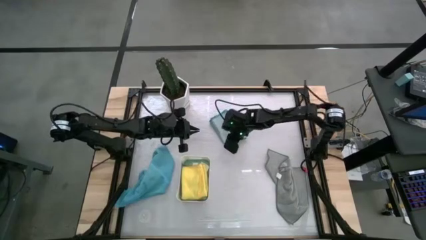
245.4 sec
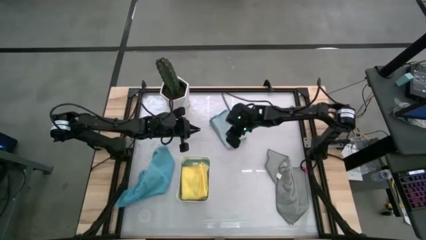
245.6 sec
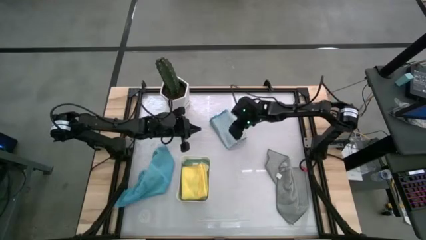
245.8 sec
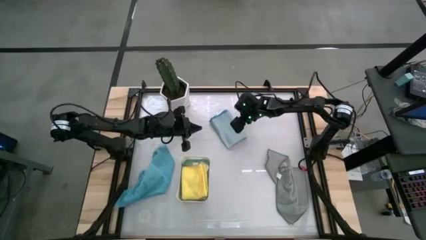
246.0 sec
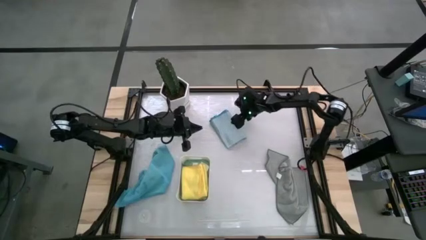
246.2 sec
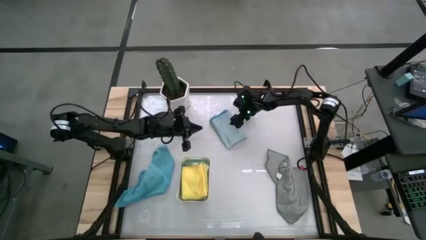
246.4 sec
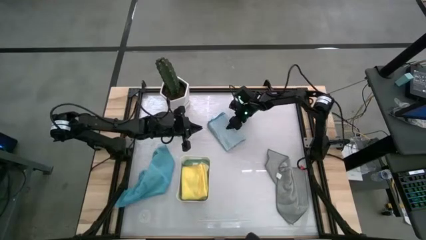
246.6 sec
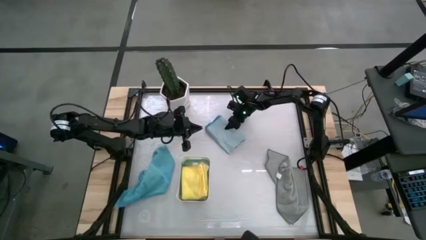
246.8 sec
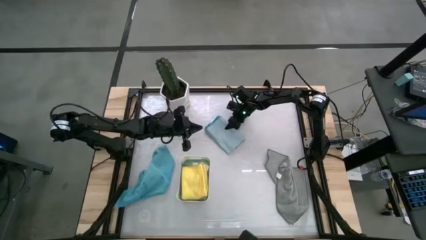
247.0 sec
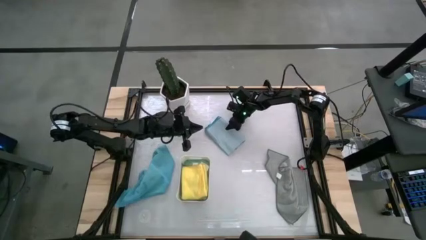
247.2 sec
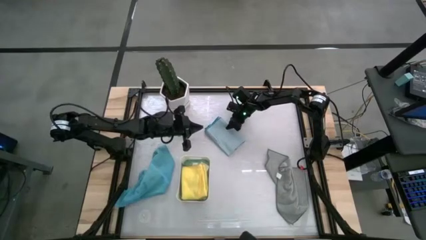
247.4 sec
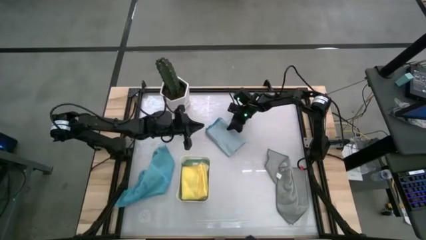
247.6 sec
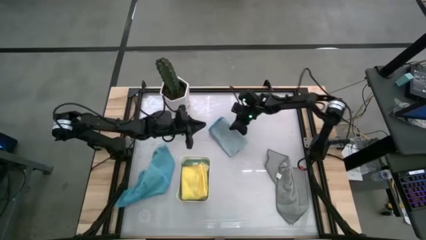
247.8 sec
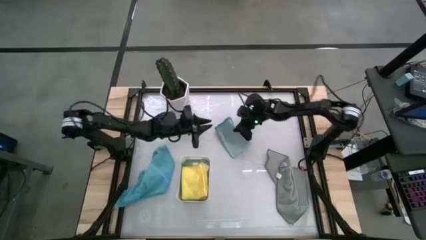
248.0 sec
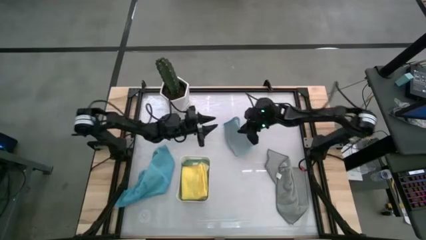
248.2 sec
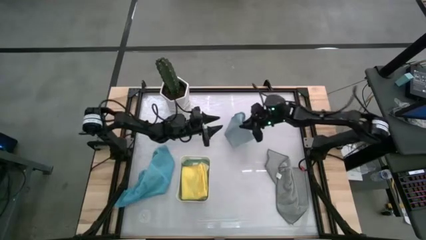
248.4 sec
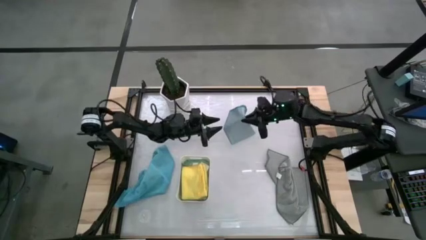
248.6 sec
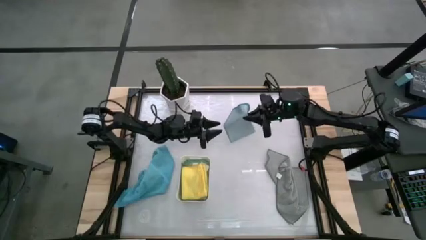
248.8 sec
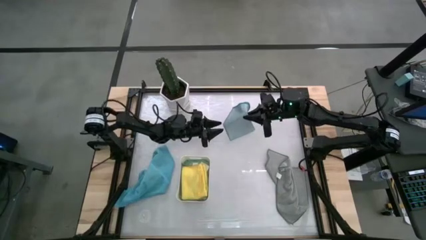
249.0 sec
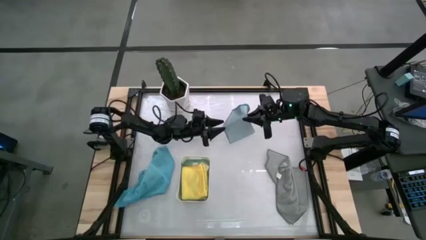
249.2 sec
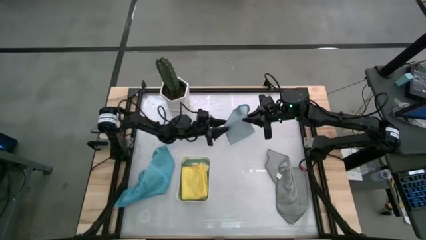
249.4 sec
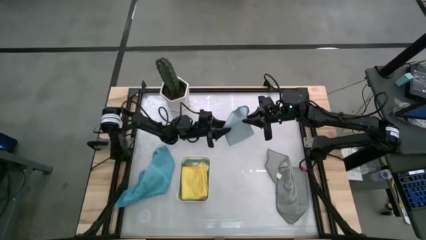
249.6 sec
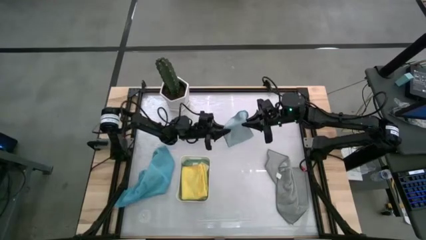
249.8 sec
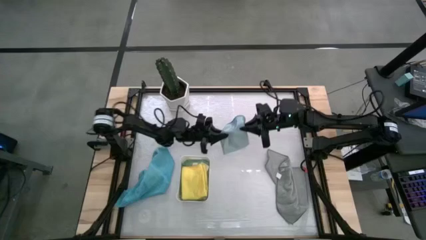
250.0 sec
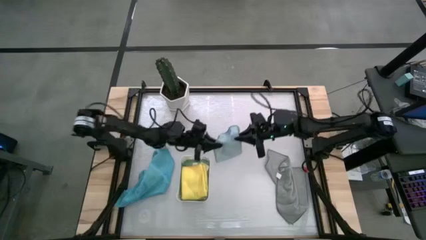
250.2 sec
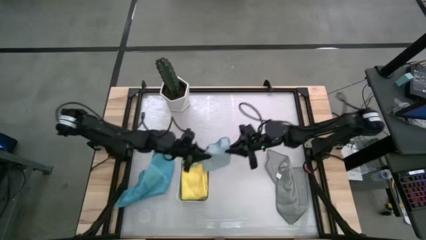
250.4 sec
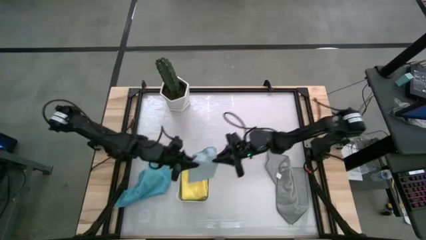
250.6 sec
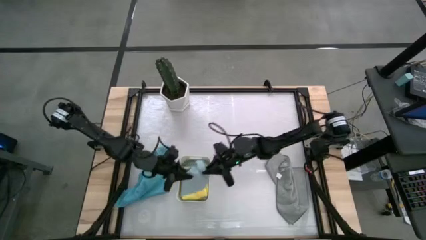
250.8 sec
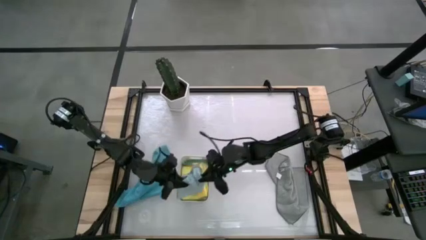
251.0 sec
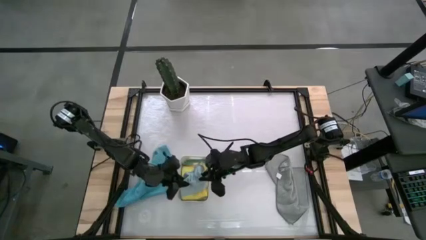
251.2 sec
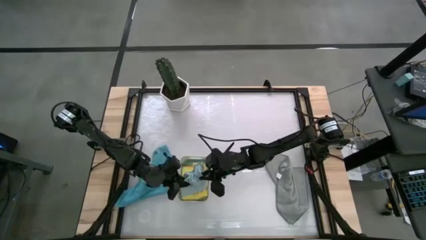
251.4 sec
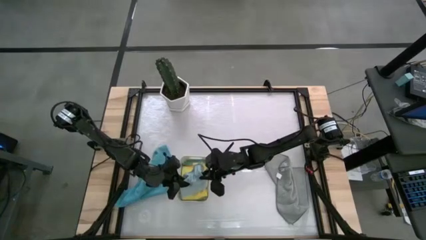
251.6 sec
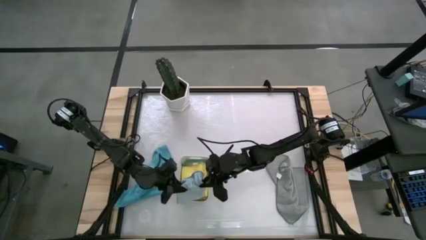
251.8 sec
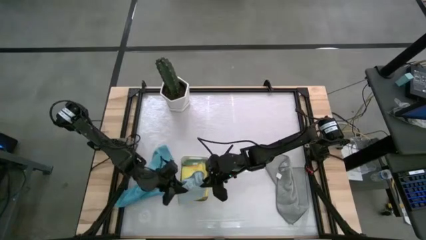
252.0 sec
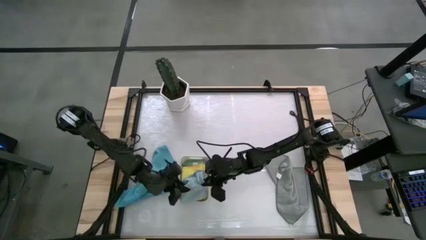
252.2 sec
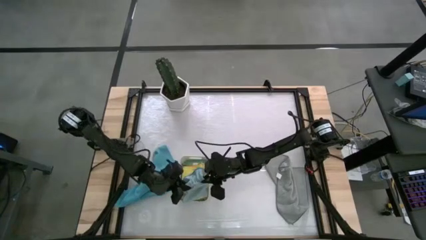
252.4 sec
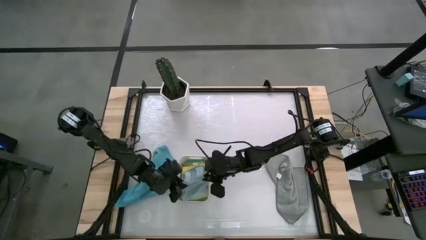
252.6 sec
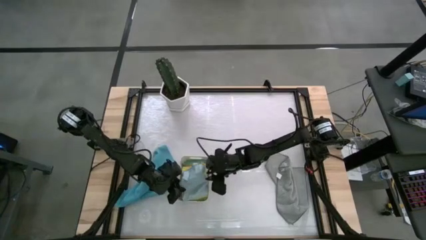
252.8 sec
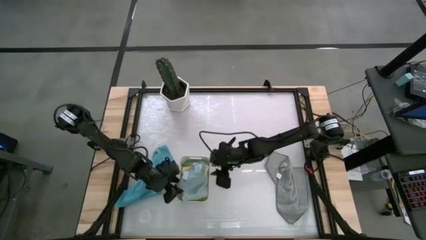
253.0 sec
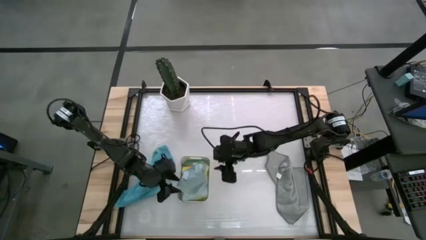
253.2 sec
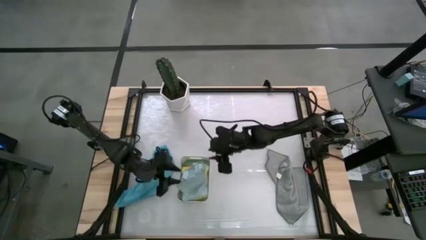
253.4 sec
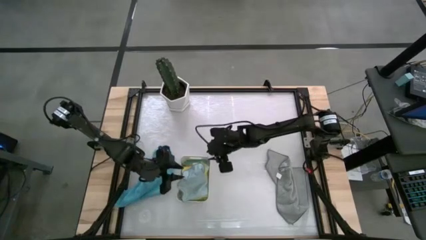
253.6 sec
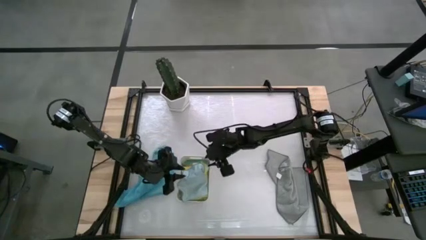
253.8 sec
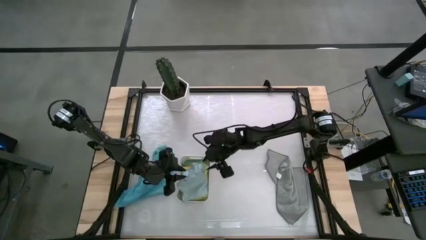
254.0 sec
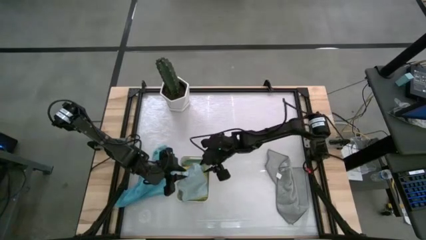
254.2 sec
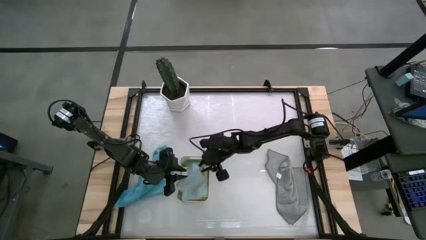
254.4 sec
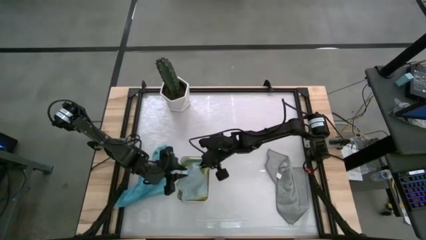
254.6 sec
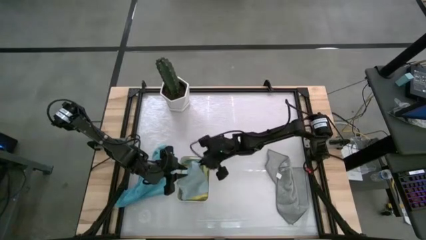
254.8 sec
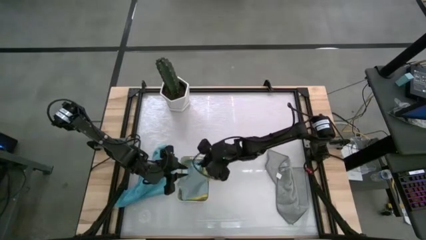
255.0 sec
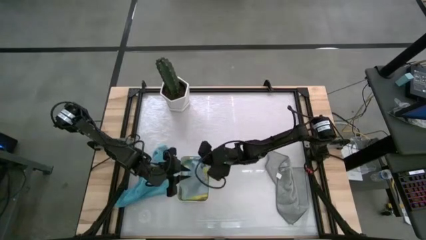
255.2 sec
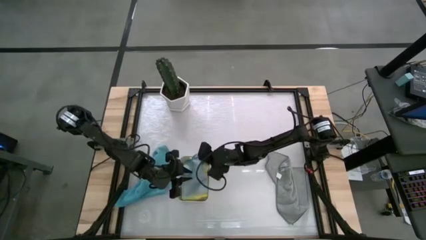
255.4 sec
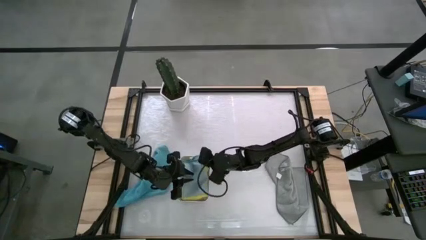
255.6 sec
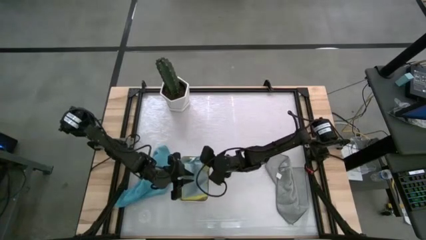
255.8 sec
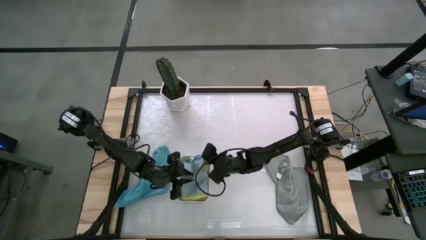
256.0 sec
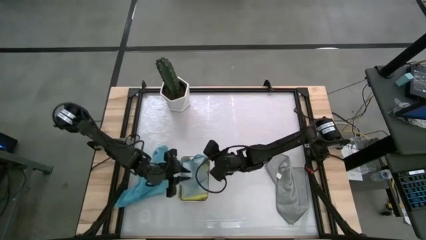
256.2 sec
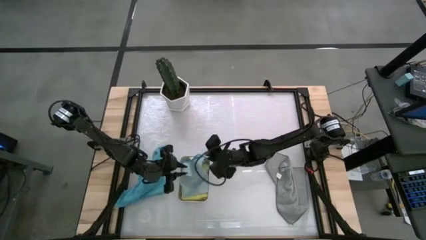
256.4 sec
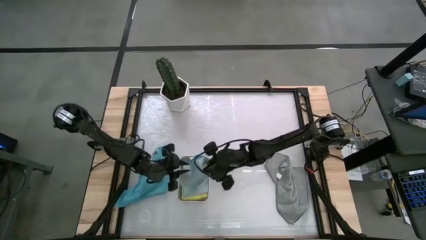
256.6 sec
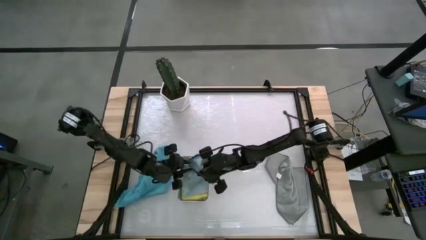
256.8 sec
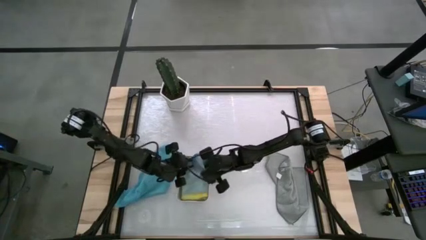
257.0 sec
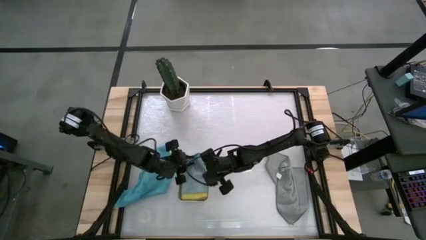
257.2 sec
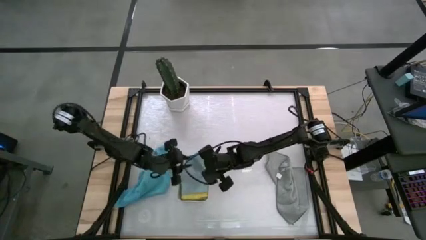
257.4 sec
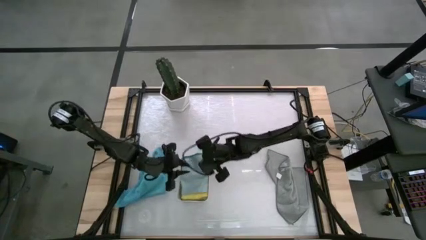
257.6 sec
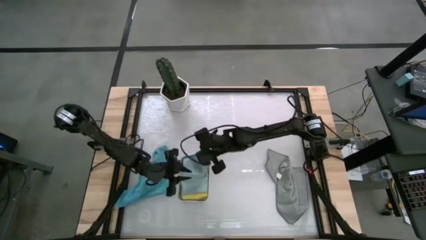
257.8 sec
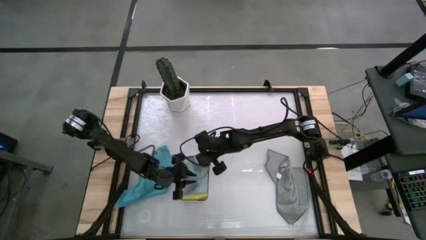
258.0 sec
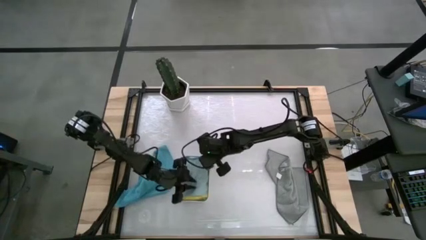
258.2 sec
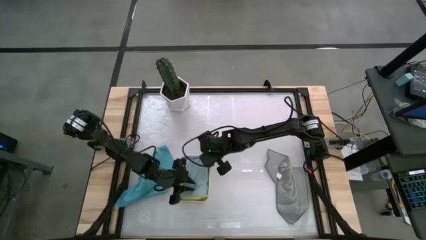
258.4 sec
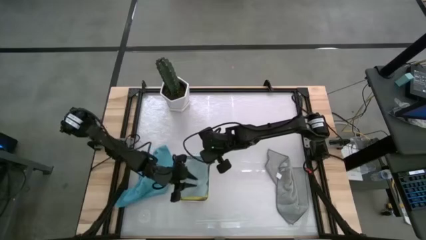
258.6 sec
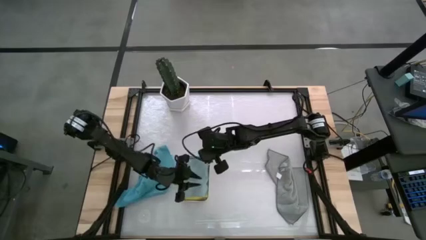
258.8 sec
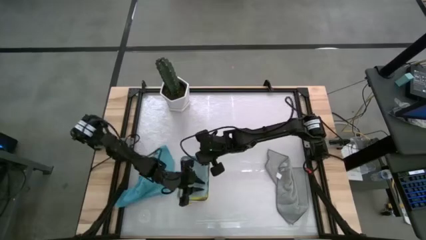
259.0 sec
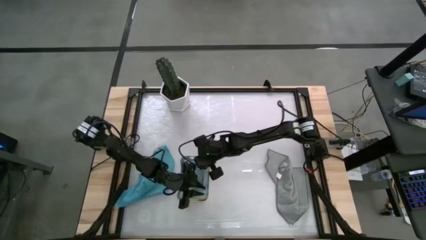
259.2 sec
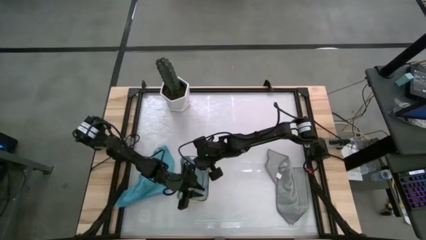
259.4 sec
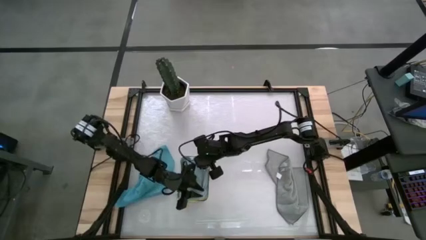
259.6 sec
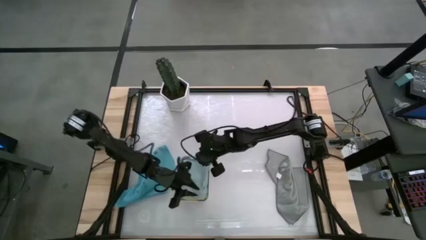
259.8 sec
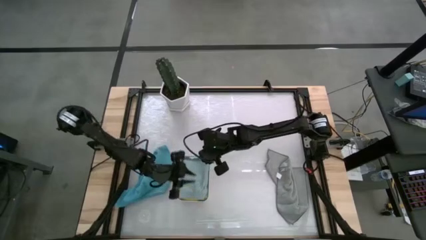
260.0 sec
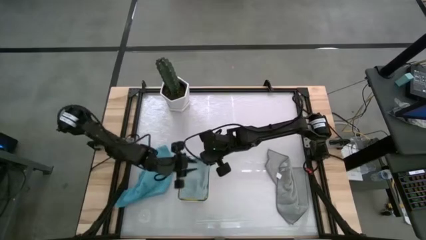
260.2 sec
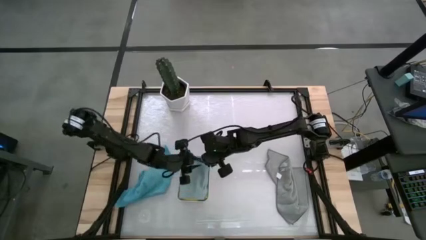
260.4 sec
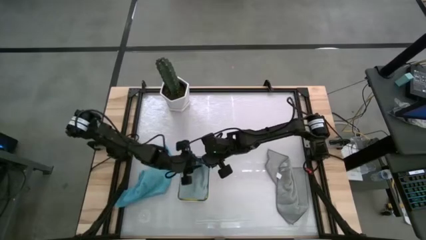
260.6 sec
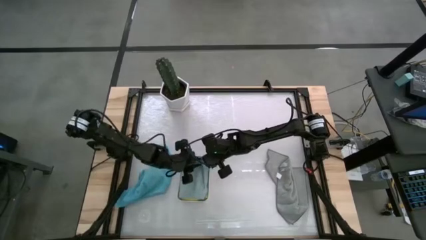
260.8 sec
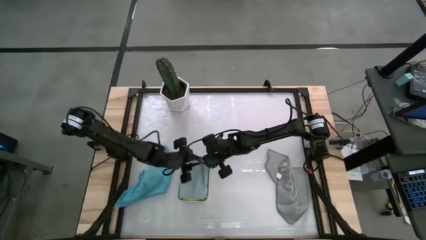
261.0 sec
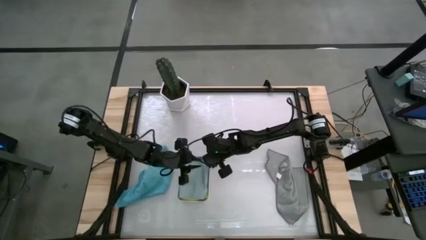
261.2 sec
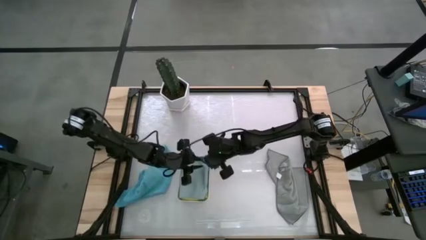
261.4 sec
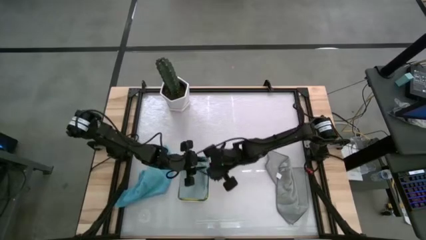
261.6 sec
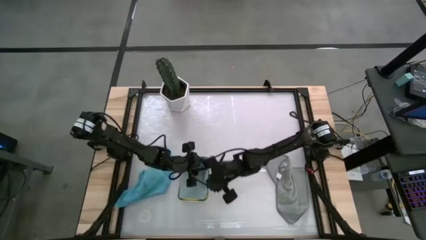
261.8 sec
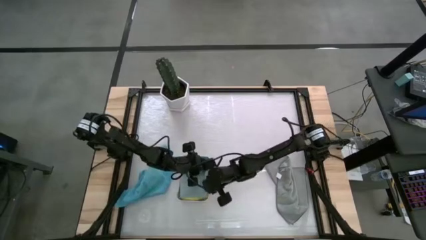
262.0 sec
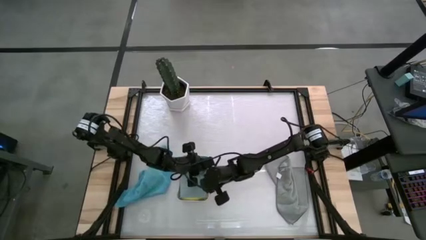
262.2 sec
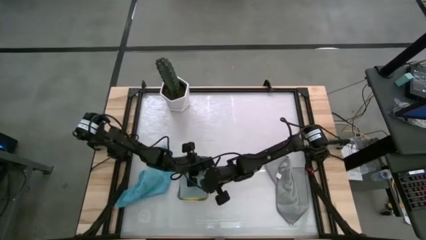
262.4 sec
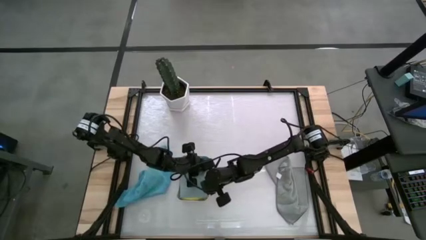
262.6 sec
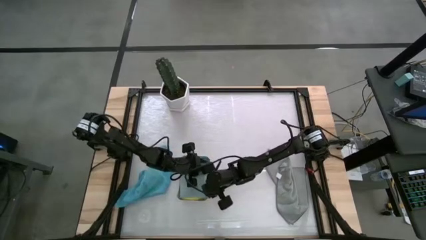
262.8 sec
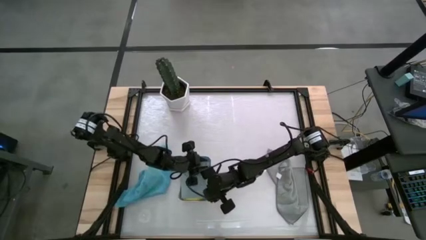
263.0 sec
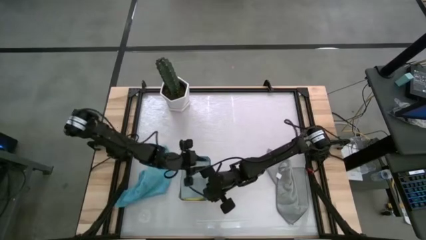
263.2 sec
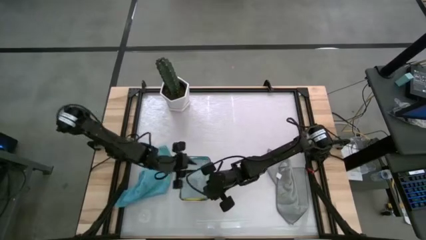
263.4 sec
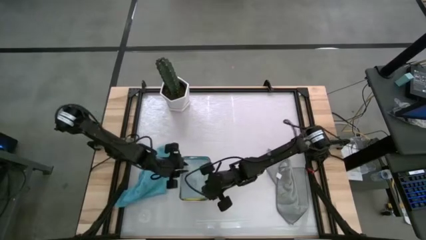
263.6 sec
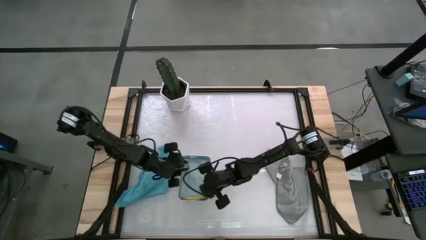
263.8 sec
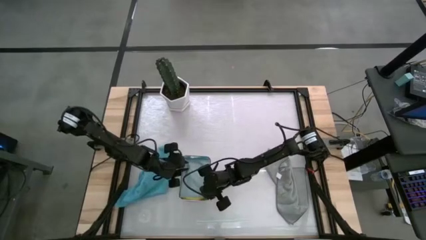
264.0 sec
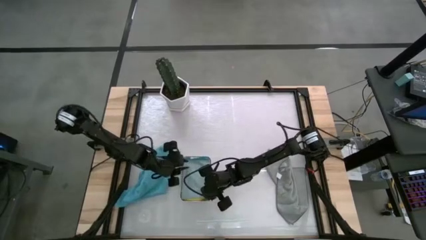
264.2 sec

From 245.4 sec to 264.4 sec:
Task: Fold microfiber towels
Put the light blue microfiber towel into the bin
